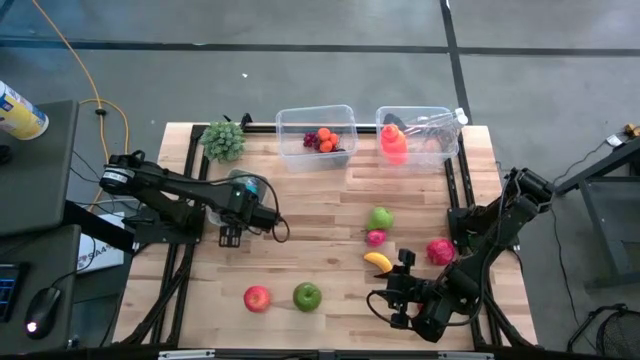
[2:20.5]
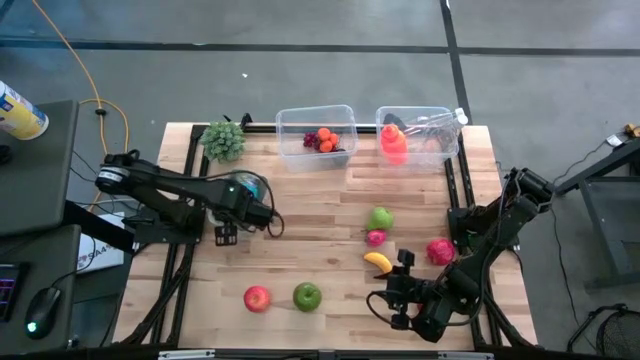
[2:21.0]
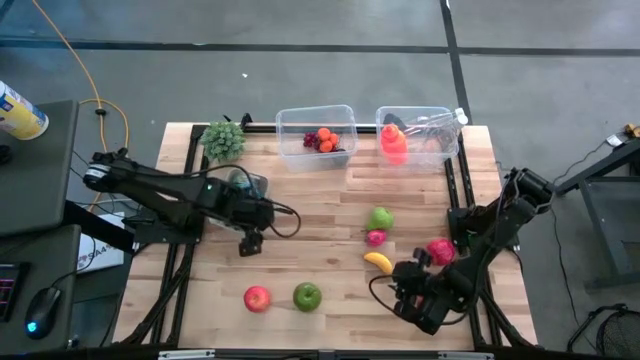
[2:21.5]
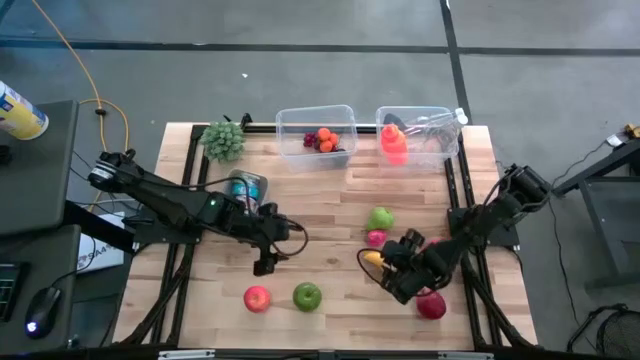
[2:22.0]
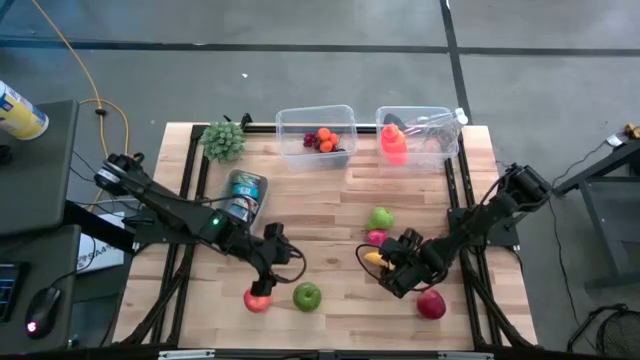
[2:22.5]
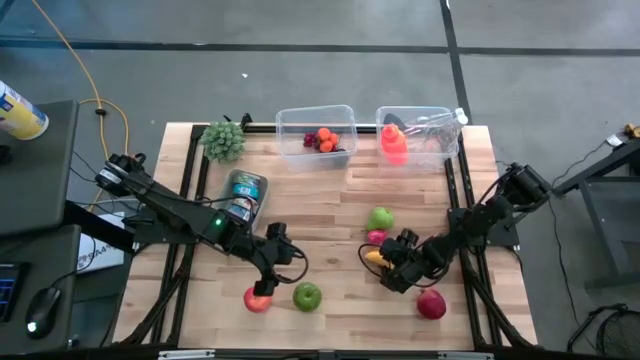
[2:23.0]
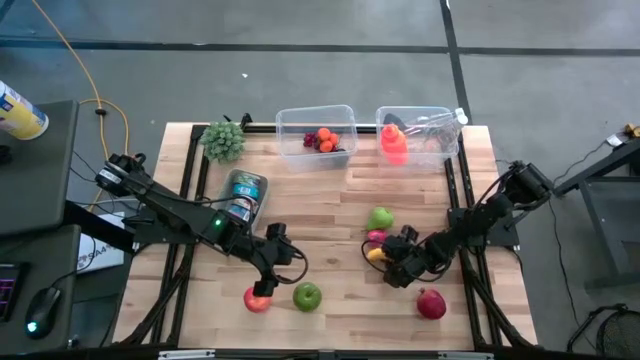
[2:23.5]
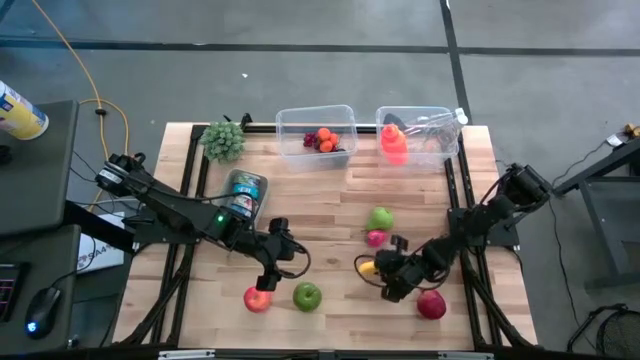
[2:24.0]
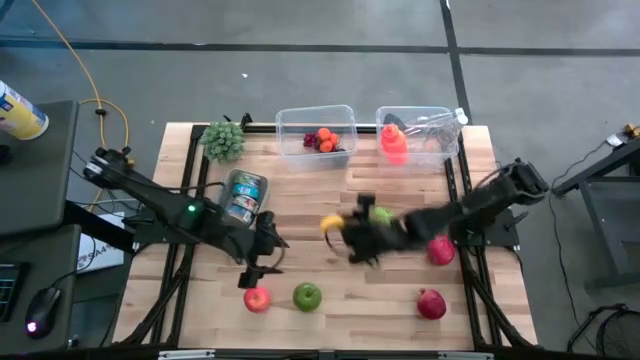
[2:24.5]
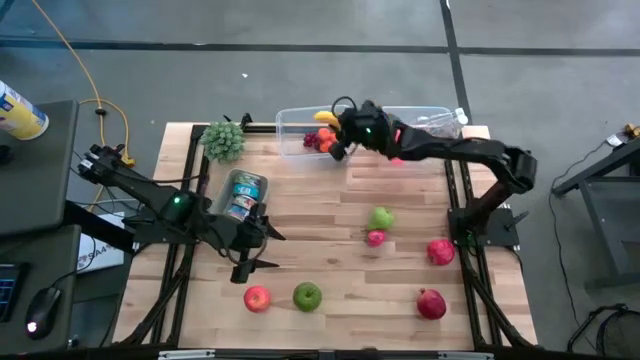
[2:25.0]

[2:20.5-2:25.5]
Task: Pick & Place Food Item
Put the banana into the left transparent bin

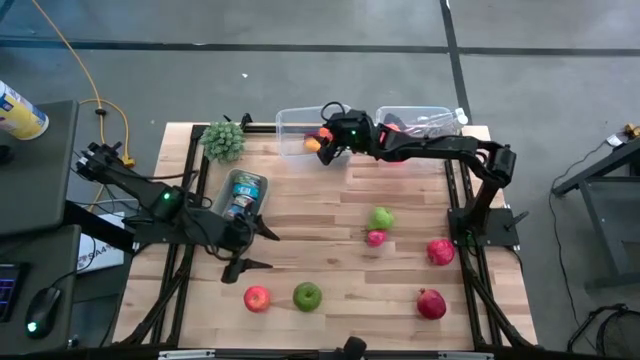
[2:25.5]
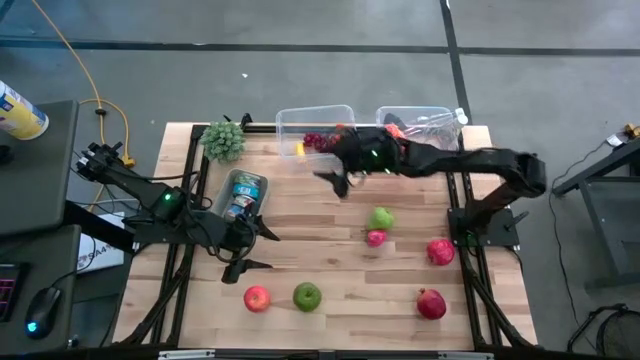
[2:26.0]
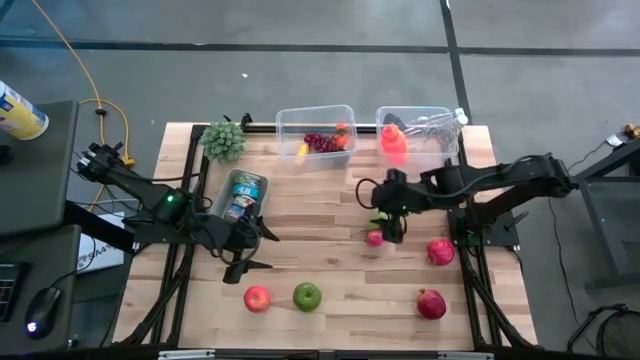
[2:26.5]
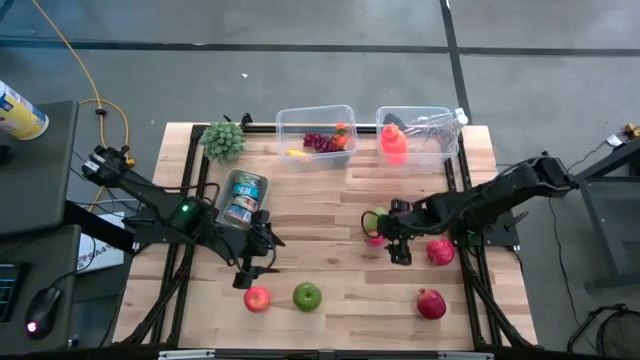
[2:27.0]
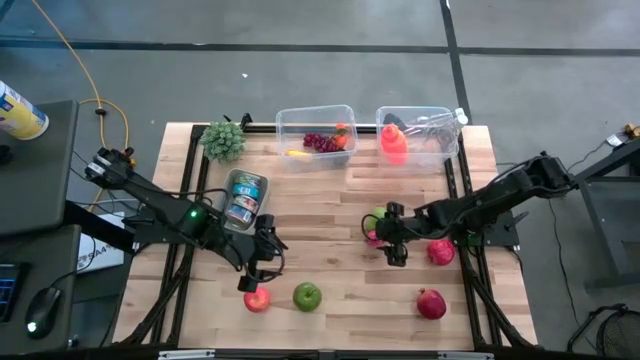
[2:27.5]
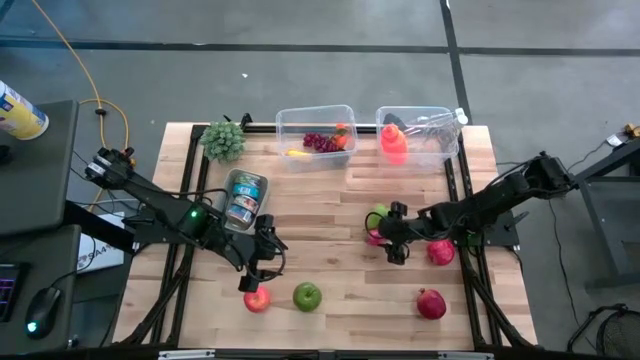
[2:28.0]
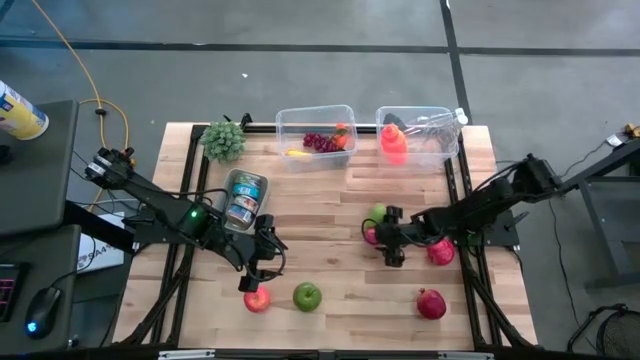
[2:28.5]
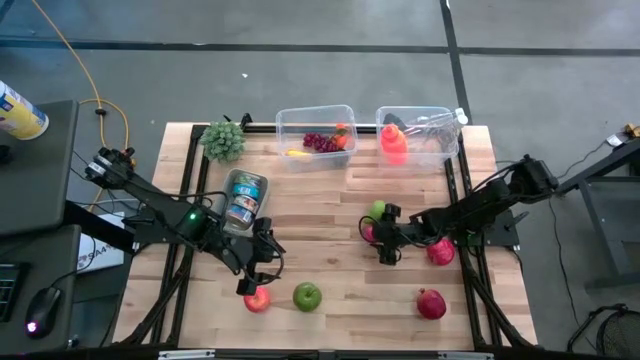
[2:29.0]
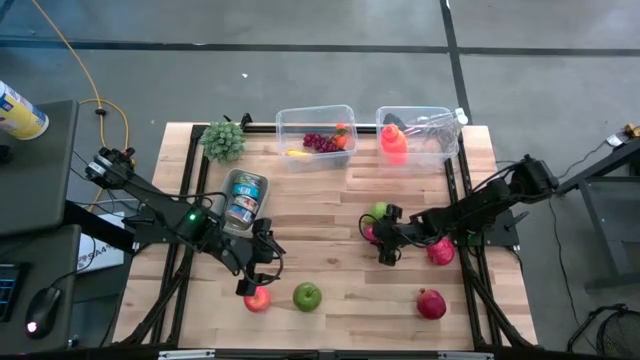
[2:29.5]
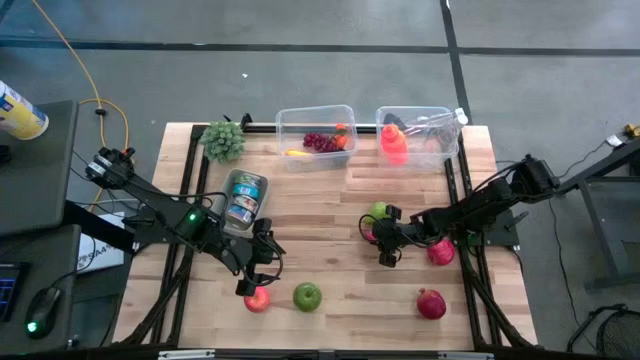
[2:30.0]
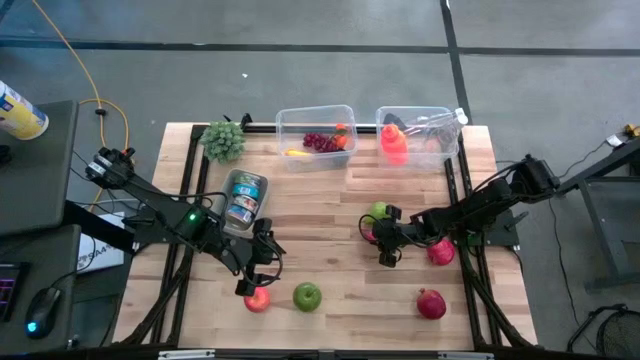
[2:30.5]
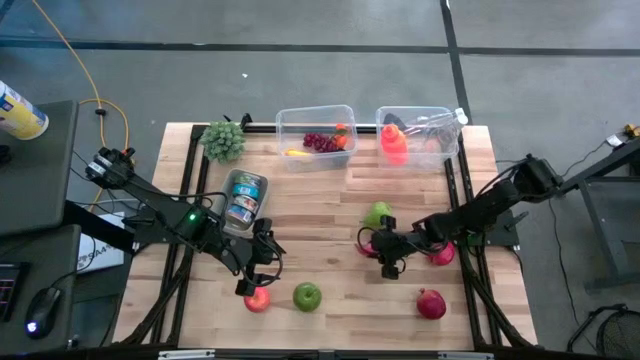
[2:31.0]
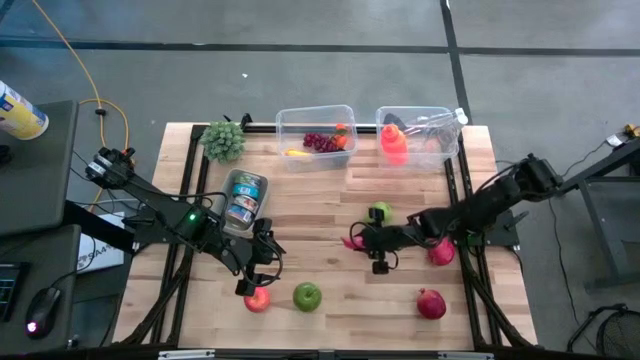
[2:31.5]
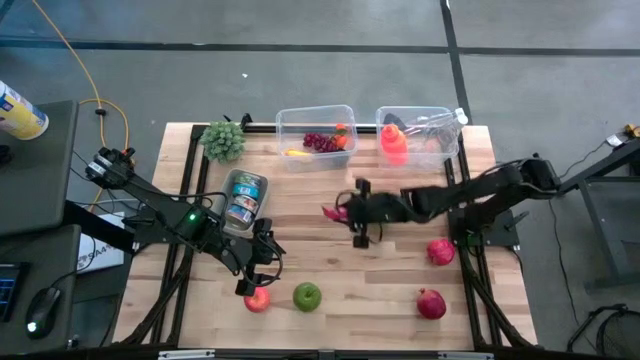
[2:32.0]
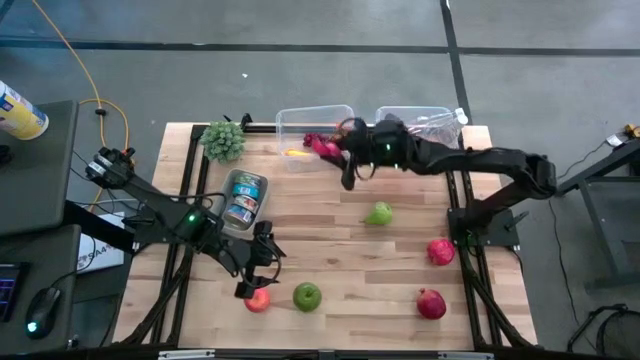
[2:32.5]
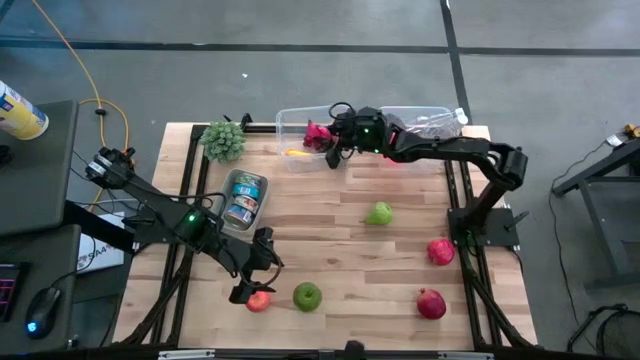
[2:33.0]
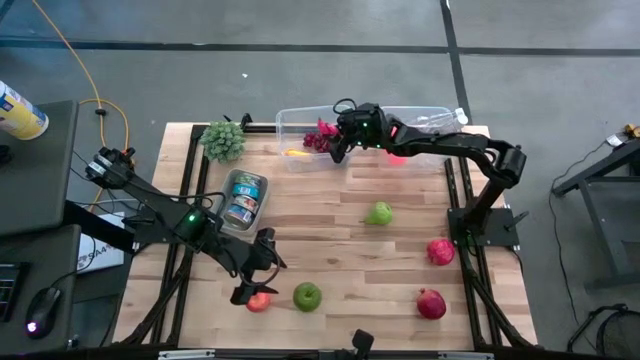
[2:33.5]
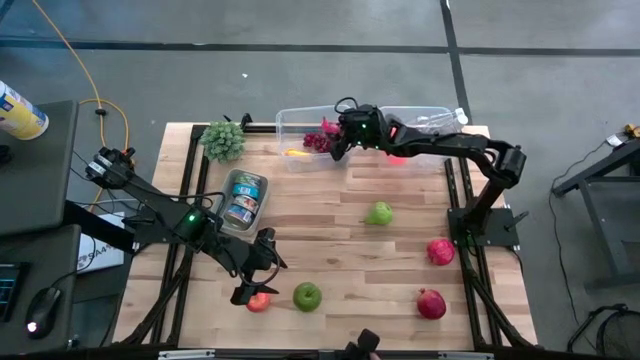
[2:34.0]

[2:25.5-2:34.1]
Put the dragon fruit into the left transparent bin

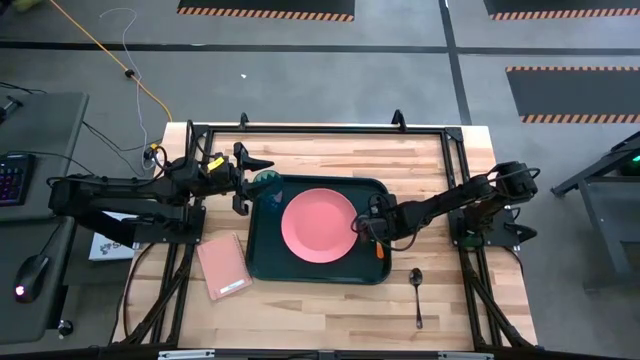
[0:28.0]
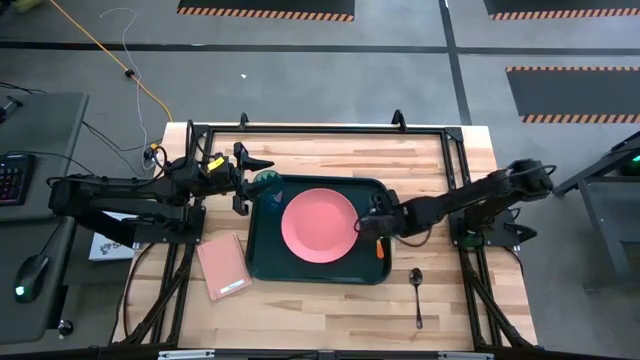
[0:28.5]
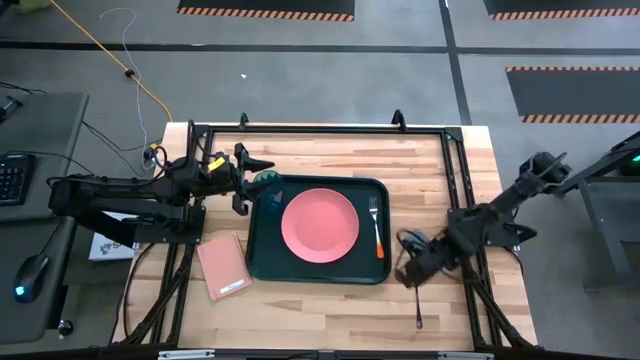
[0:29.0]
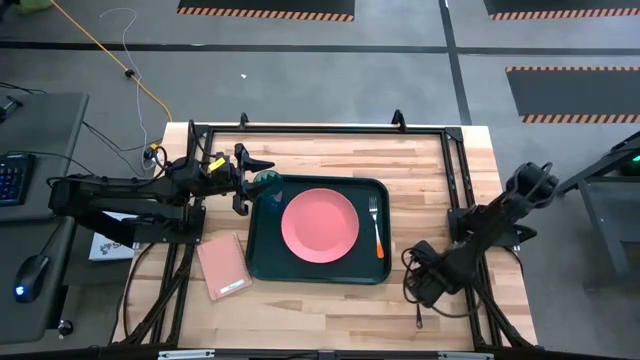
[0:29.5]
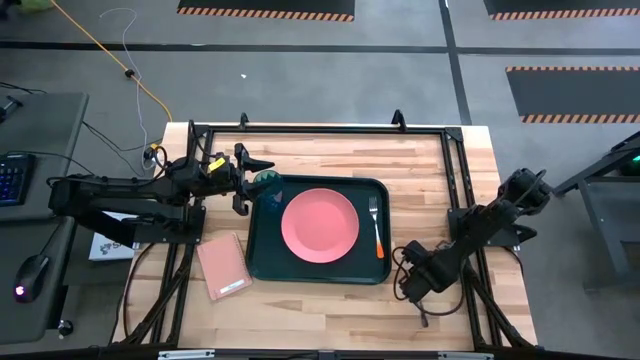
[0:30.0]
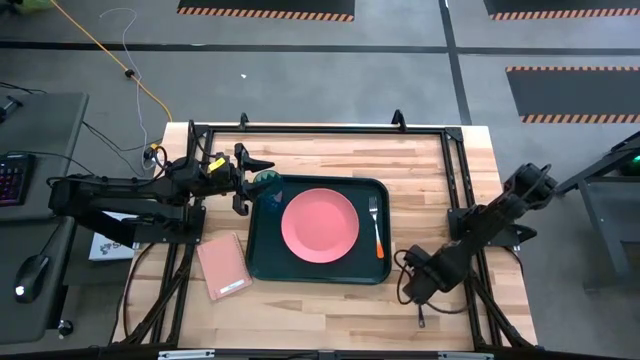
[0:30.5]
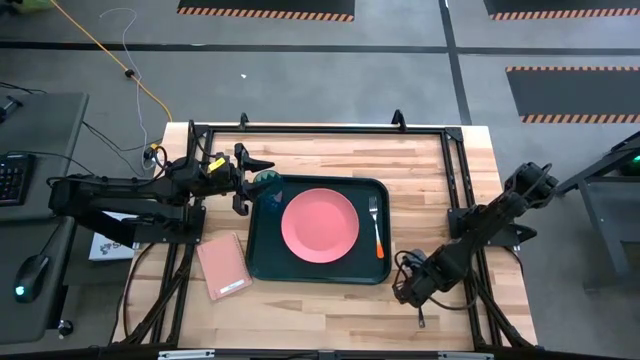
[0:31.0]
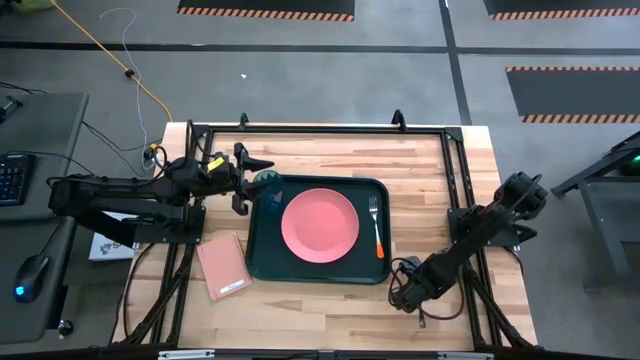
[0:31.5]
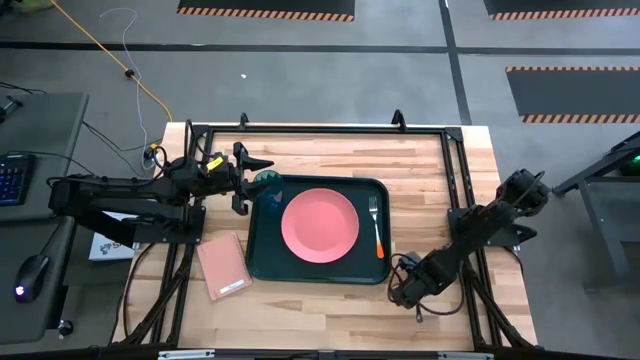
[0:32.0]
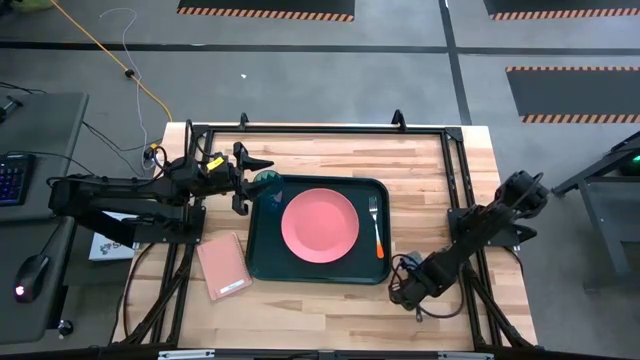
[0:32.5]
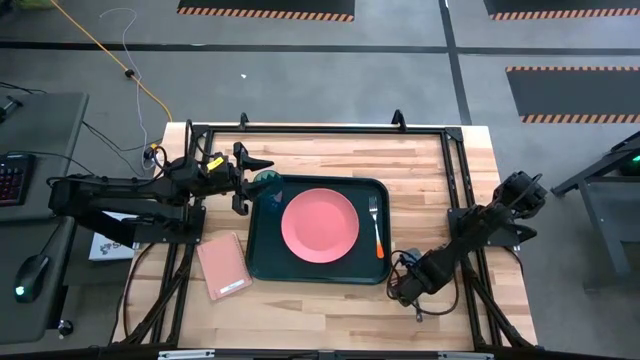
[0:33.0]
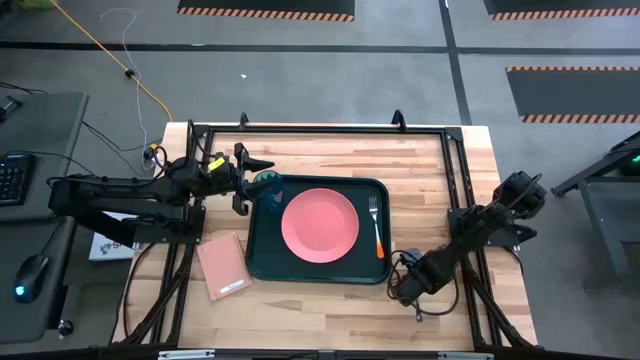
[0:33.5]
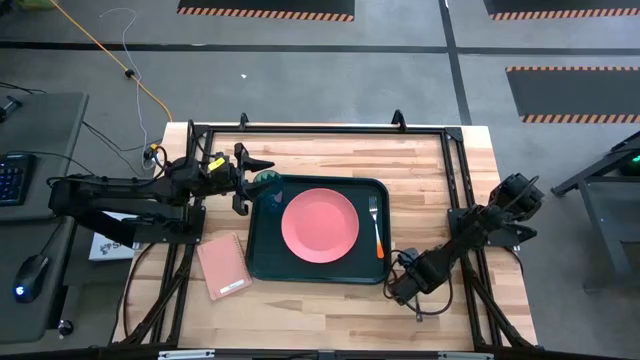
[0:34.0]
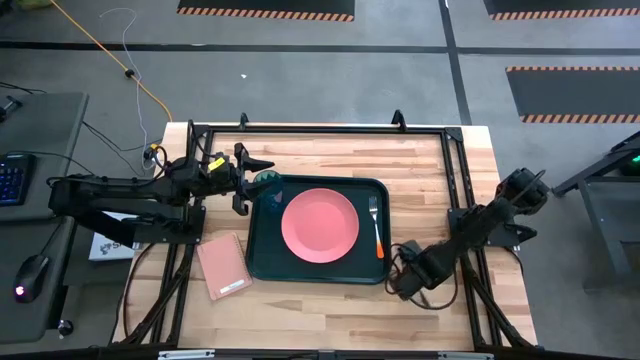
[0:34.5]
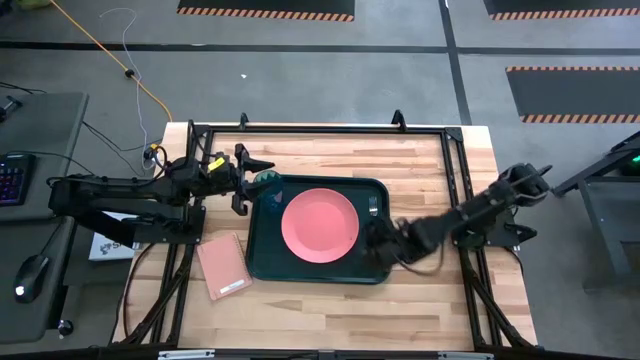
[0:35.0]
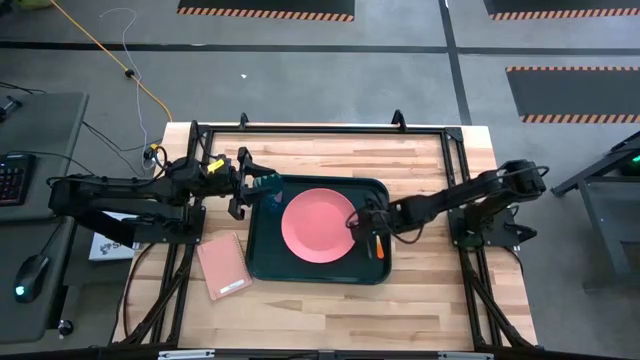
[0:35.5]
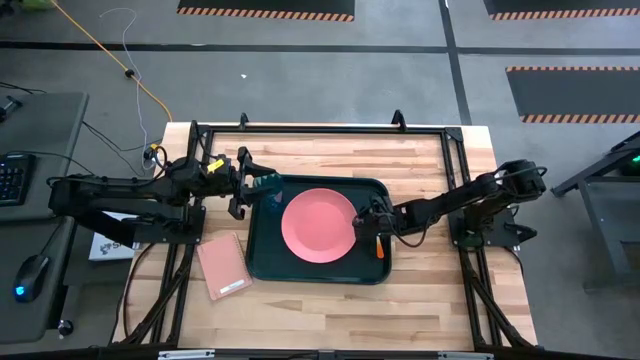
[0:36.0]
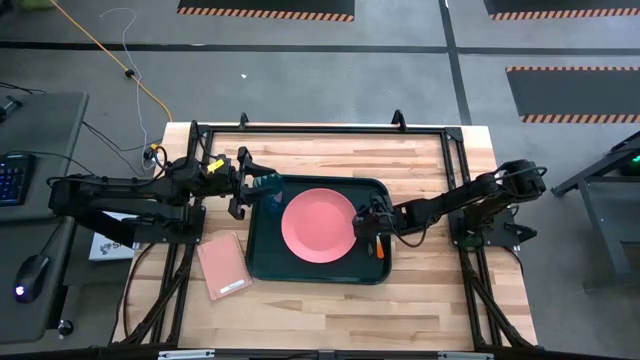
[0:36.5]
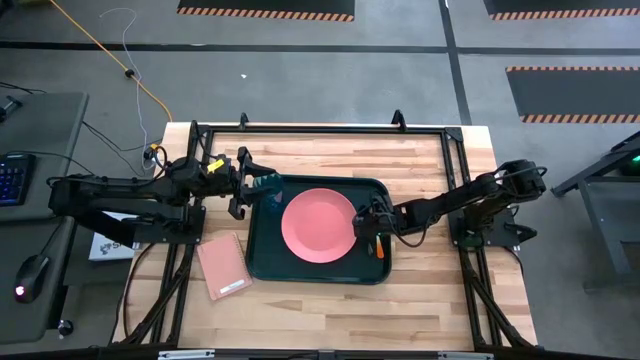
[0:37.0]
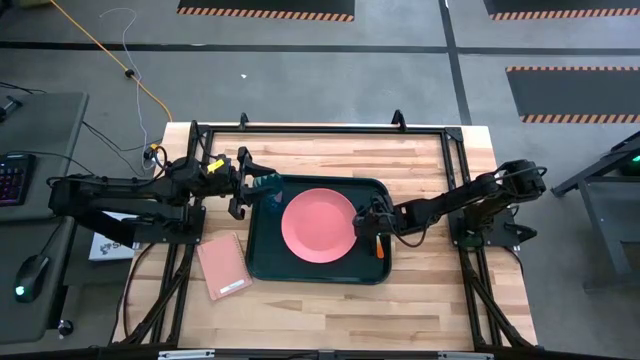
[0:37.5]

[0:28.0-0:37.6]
Task: Pick and place plate/cup/fork/spoon on tray
Put the black spoon on the black tray to the right side of the pink plate
